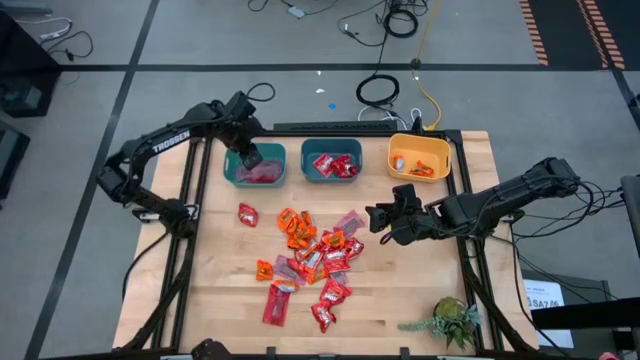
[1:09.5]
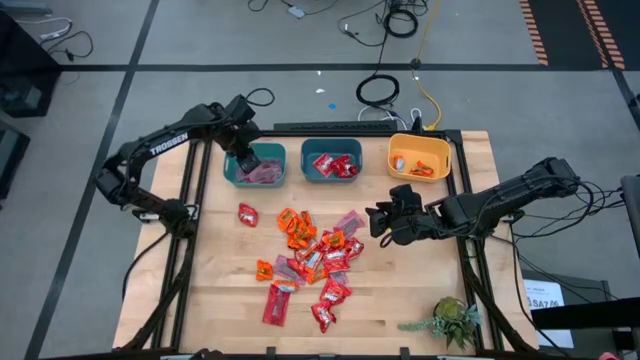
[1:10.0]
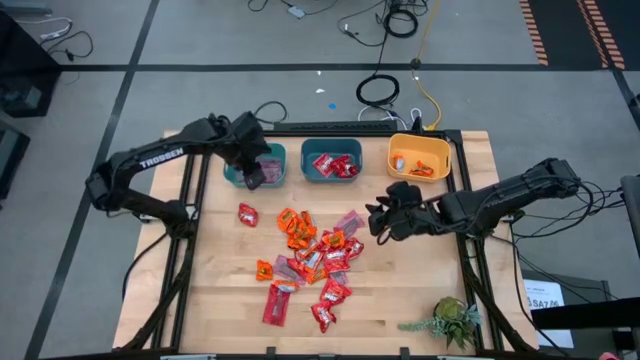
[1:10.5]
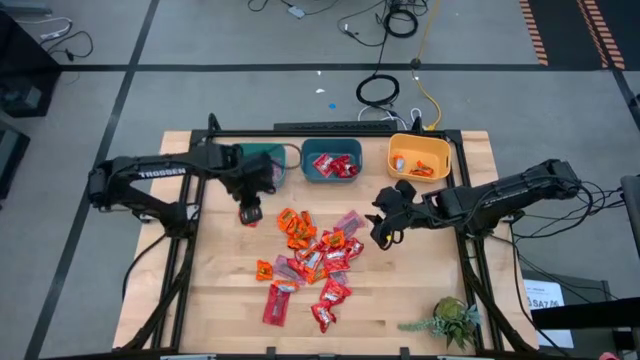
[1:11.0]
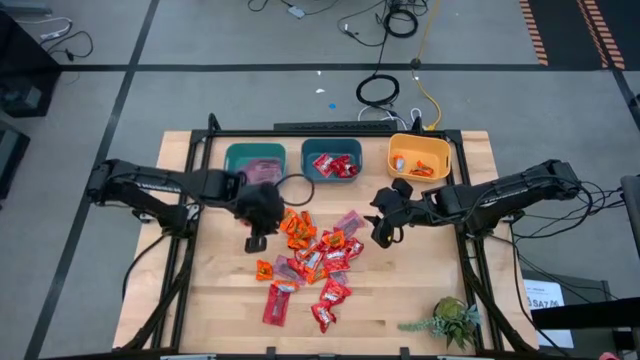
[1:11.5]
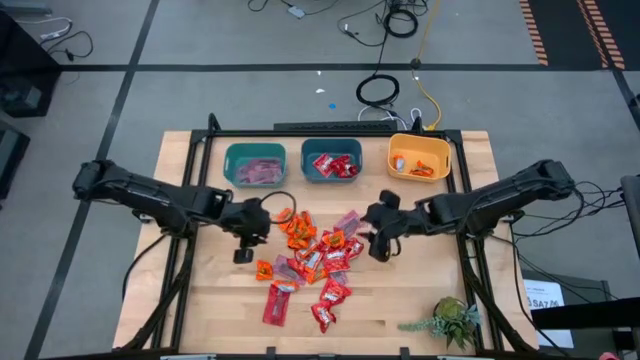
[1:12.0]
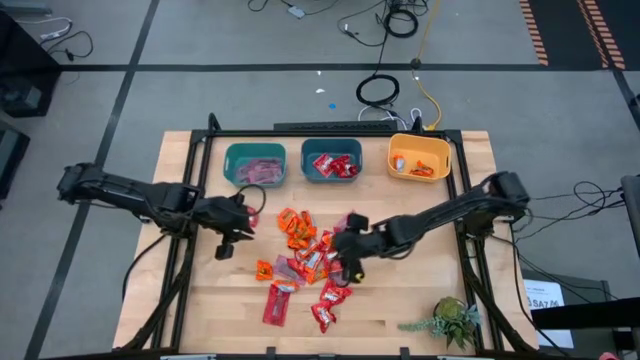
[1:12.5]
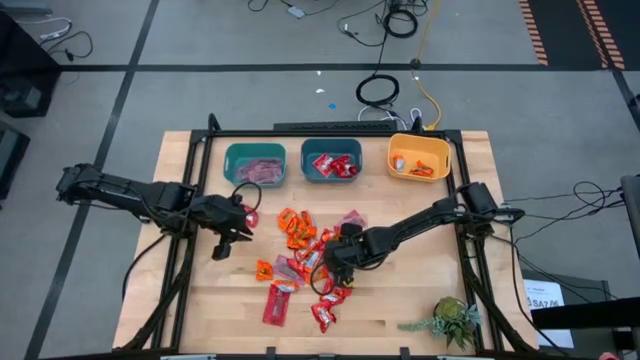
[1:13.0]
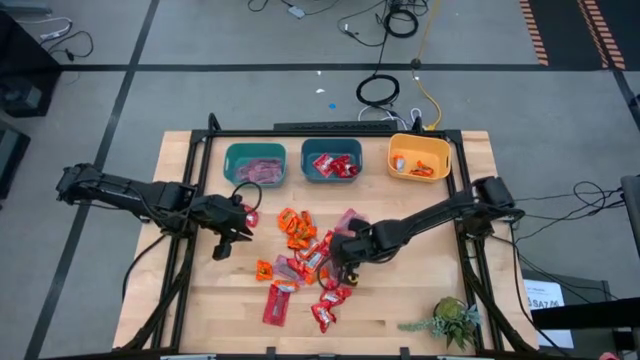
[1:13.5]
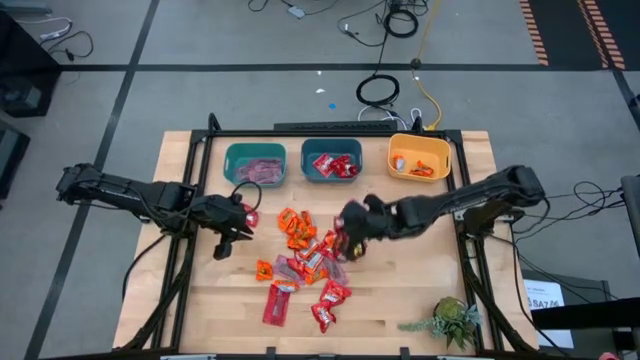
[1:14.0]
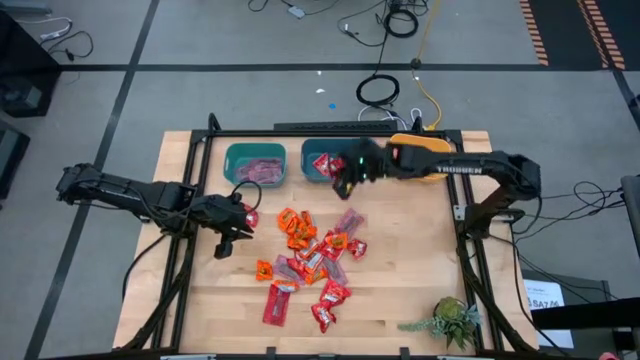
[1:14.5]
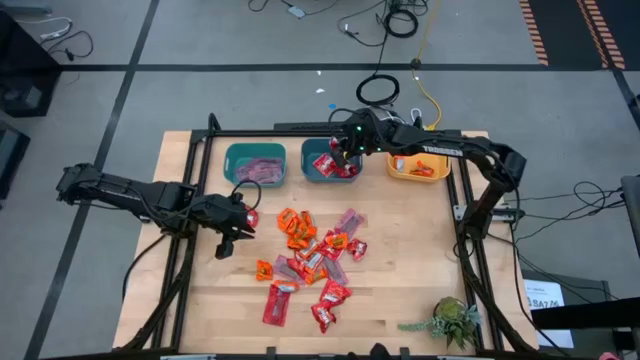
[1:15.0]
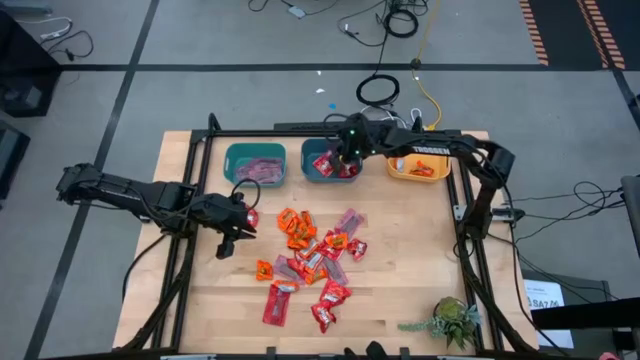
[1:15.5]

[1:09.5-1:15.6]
Task: Sort candy
Put the red candy into the blue bin

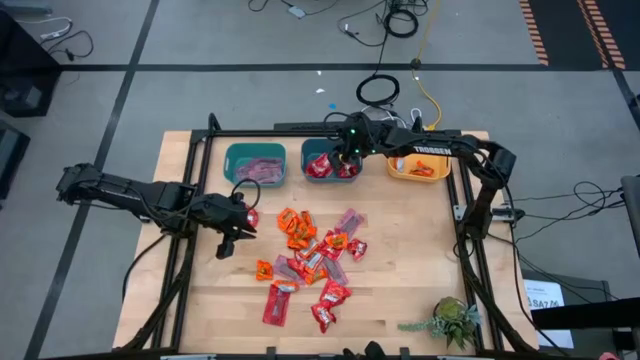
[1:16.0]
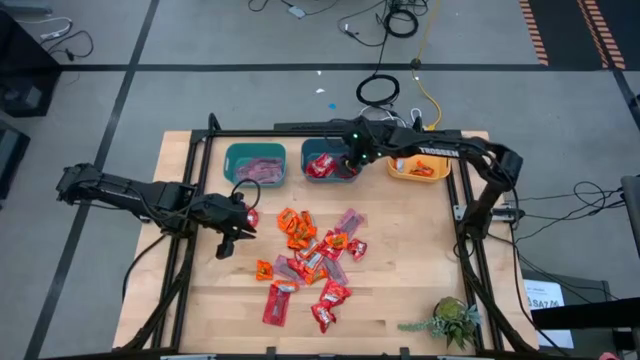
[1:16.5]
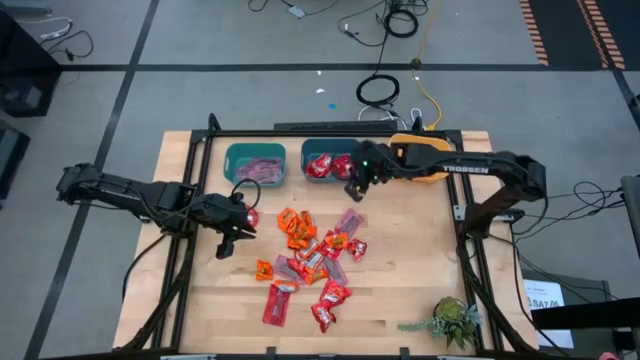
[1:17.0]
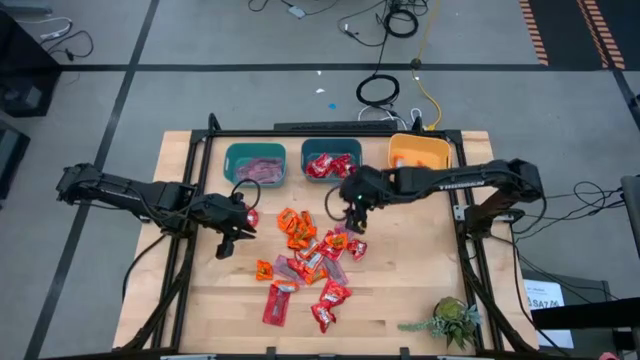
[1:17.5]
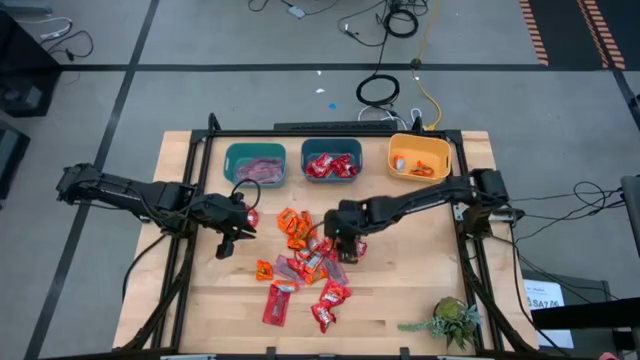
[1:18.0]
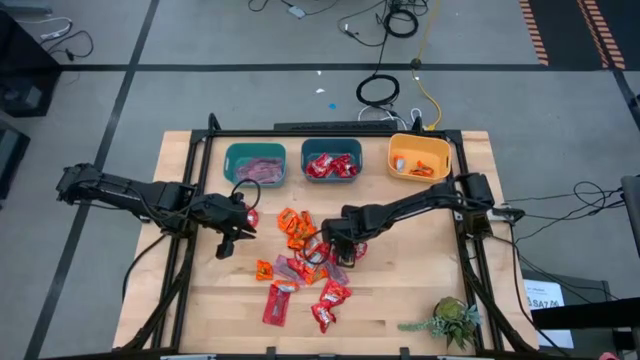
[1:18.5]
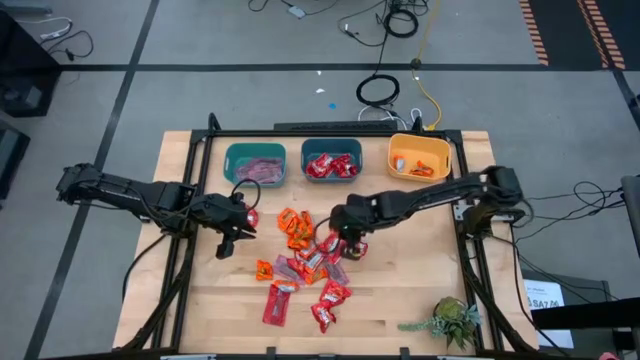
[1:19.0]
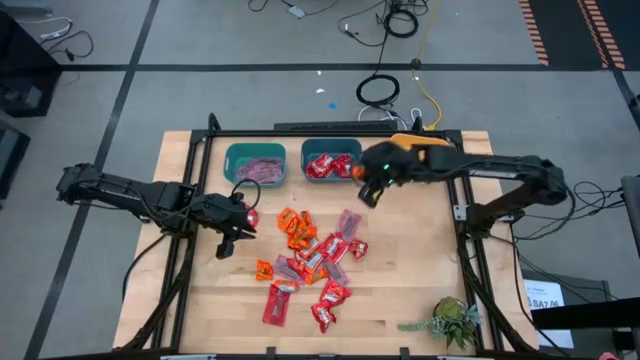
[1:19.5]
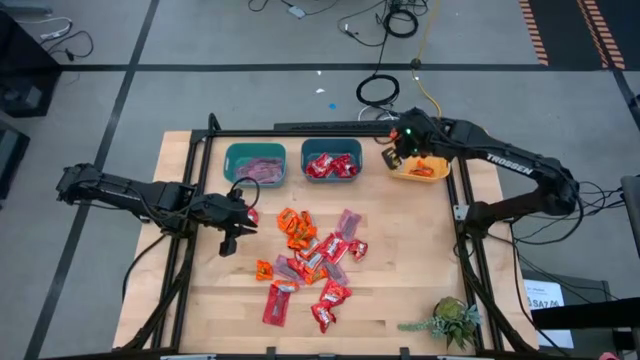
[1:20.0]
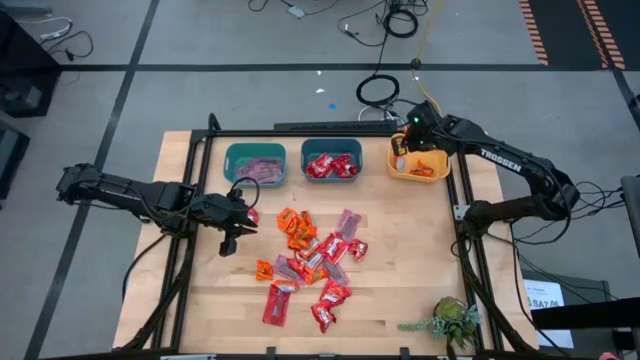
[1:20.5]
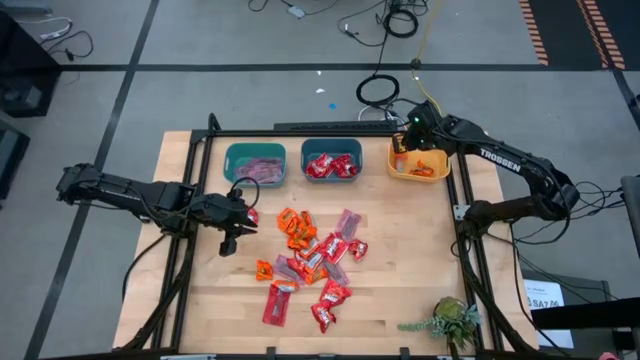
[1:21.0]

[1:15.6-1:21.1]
Put the orange chocolate into the yellow bin

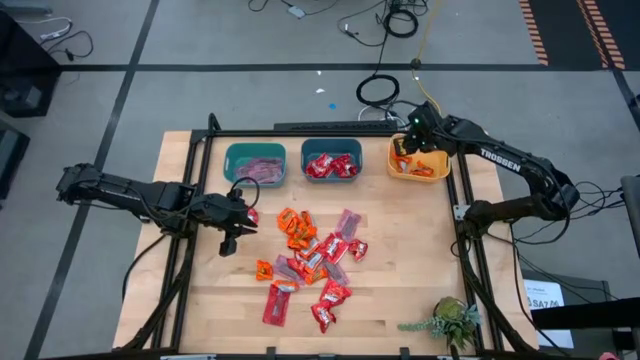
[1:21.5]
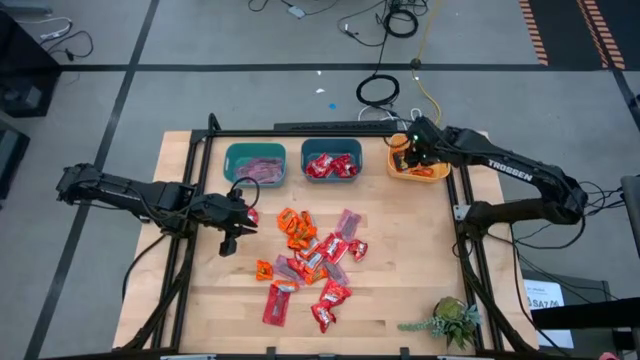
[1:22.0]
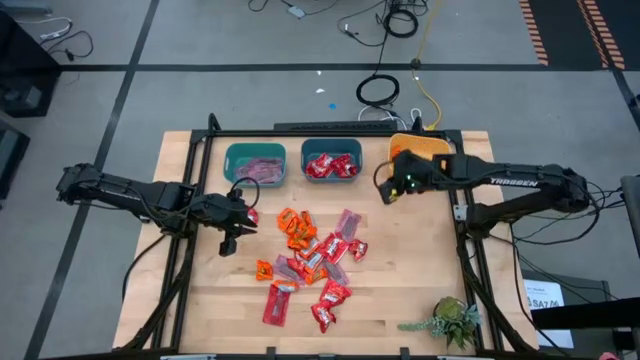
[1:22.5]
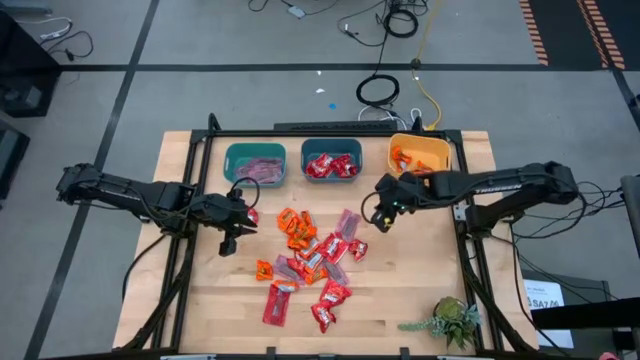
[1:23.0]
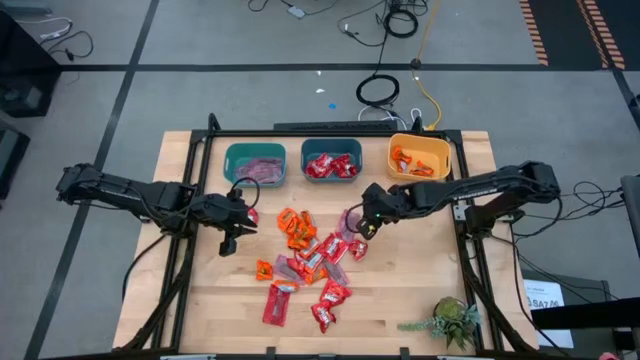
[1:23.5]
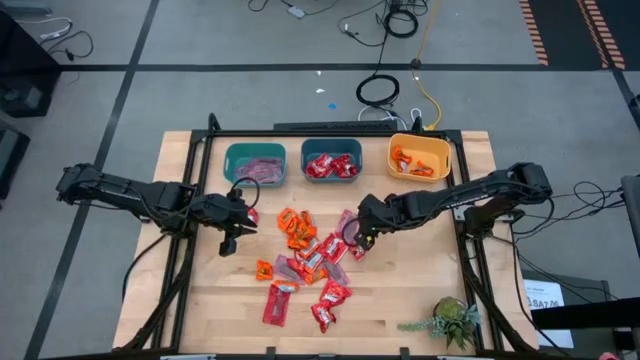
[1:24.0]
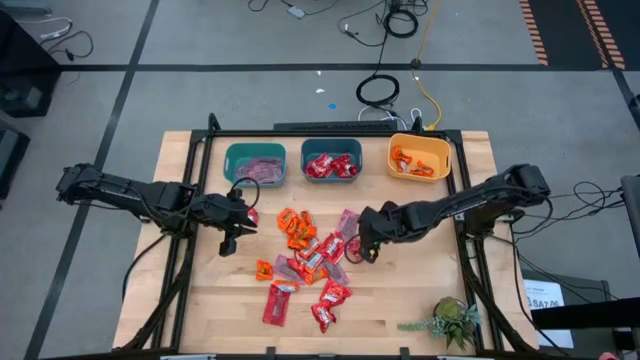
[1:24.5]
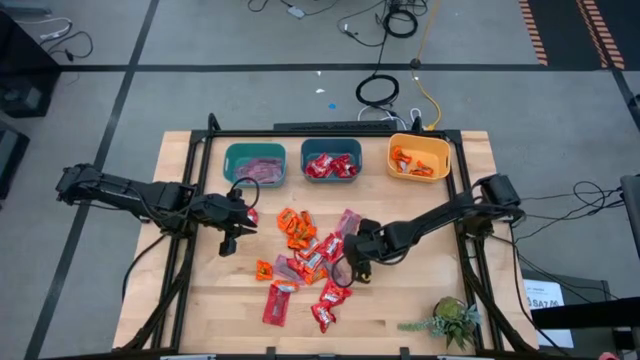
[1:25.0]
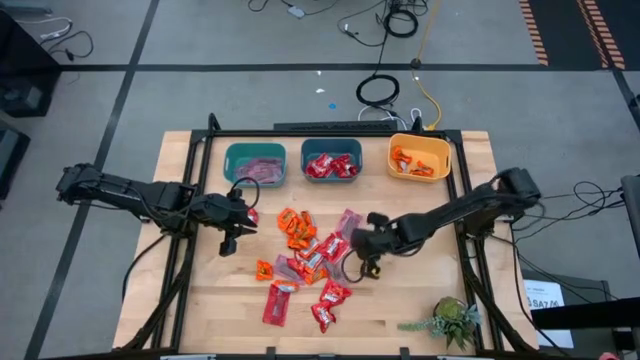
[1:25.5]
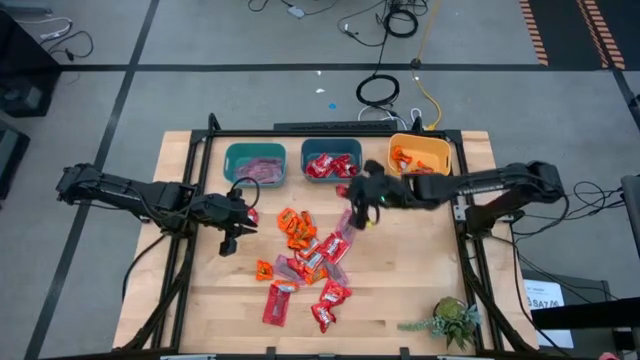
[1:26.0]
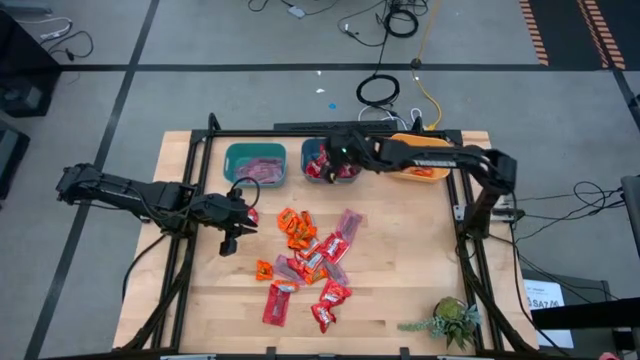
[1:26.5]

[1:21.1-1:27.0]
Put the red candy into the blue bin

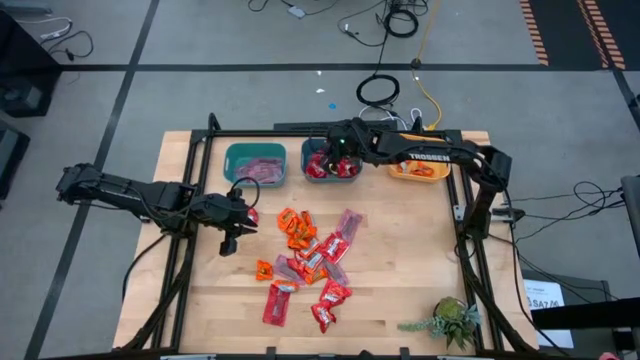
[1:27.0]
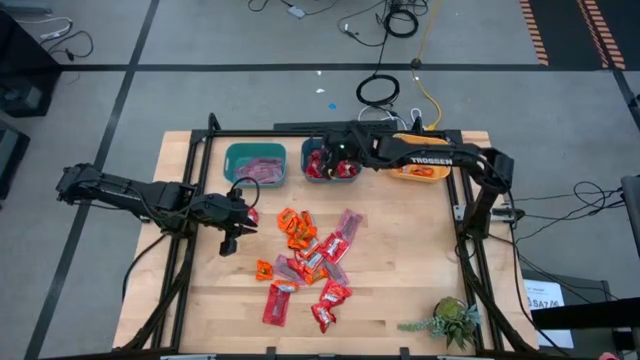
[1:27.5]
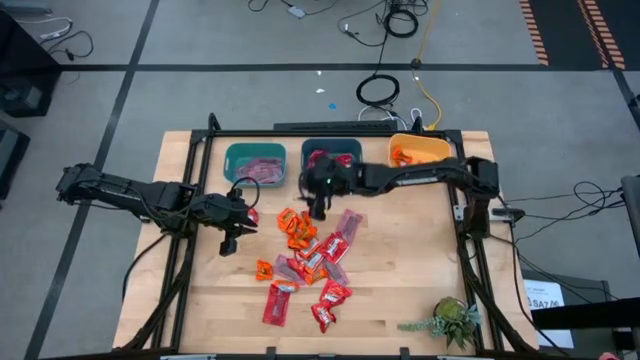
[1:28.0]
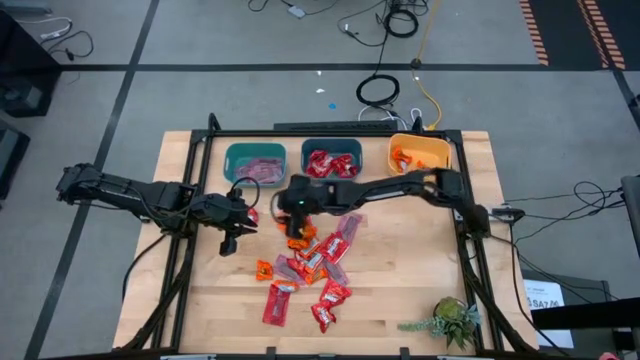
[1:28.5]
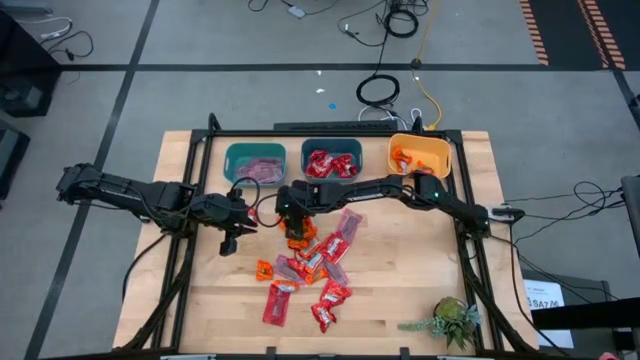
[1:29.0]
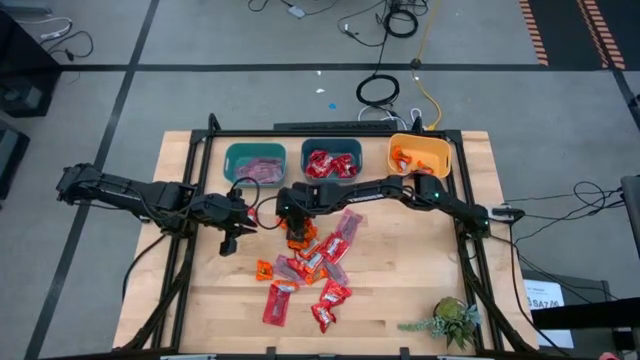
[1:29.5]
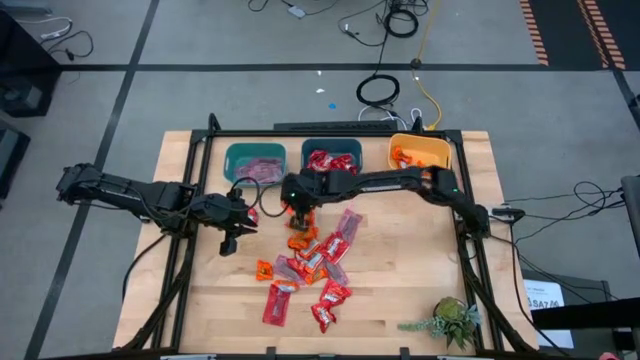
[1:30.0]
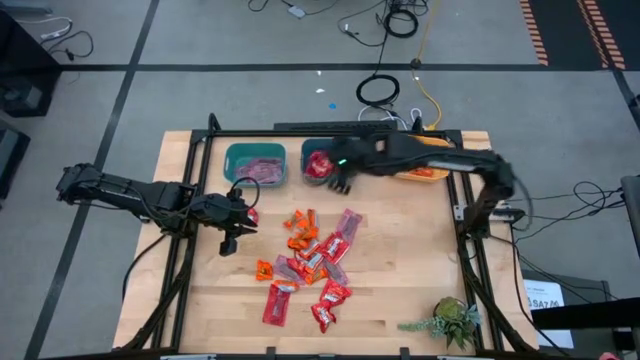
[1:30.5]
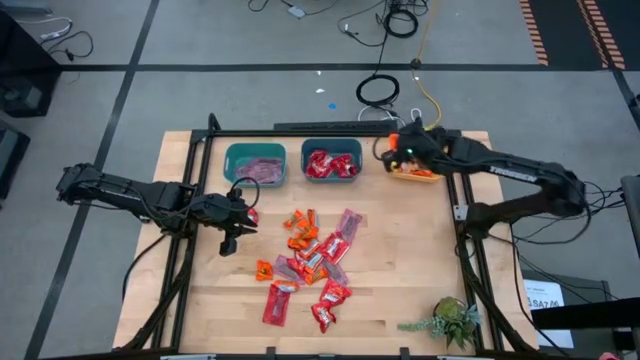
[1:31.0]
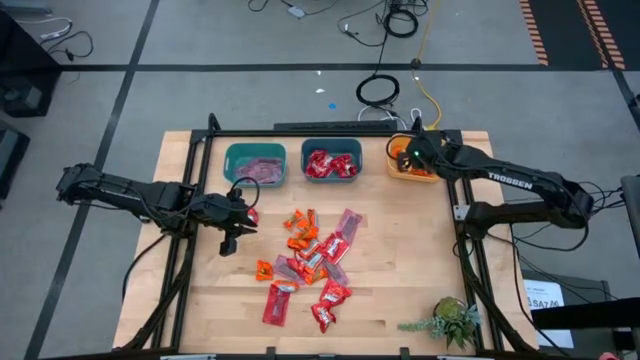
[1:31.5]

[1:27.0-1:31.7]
Put the orange chocolate into the yellow bin
